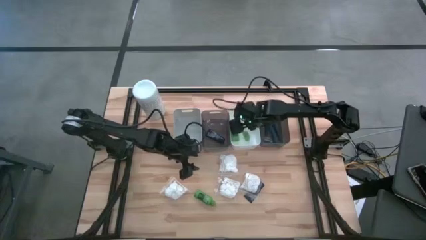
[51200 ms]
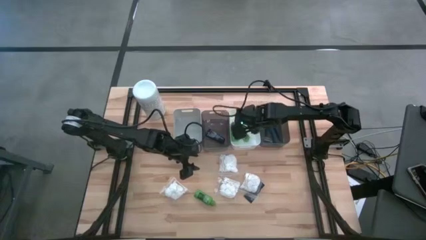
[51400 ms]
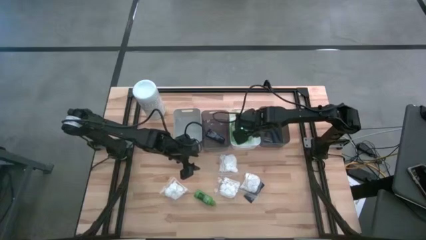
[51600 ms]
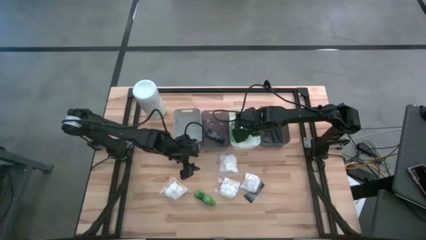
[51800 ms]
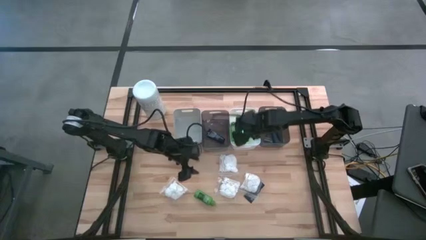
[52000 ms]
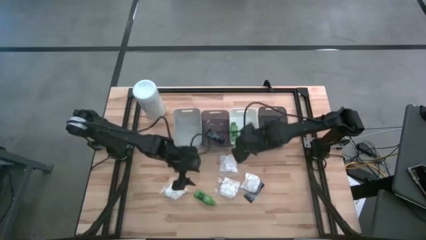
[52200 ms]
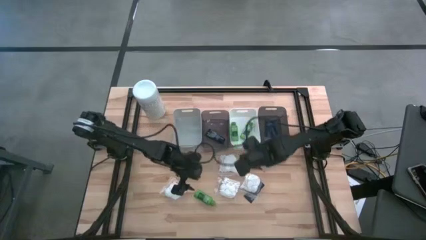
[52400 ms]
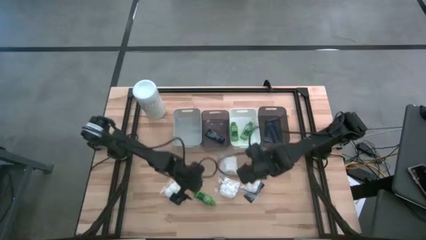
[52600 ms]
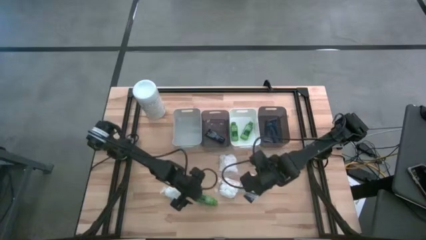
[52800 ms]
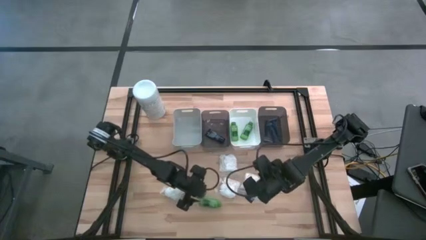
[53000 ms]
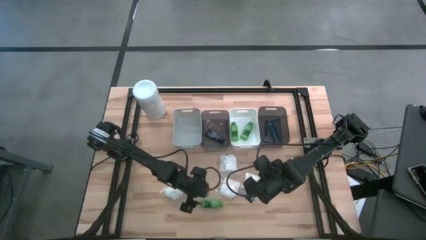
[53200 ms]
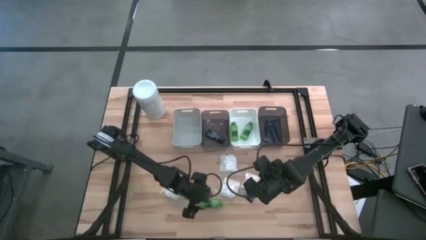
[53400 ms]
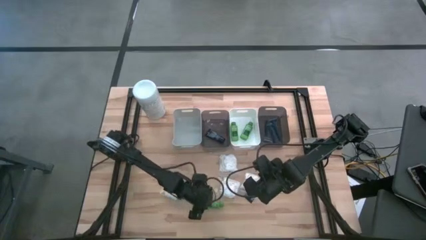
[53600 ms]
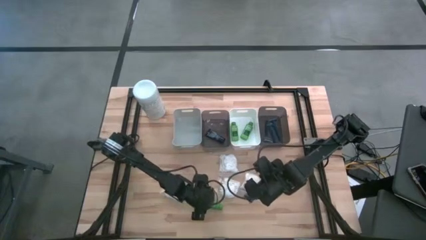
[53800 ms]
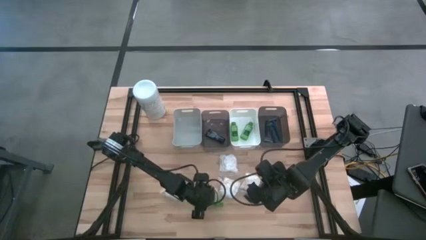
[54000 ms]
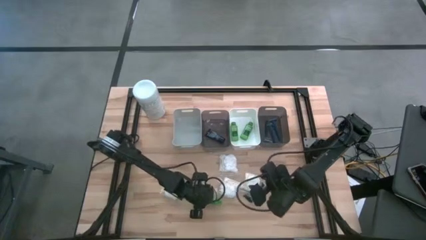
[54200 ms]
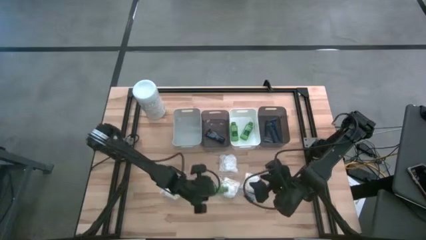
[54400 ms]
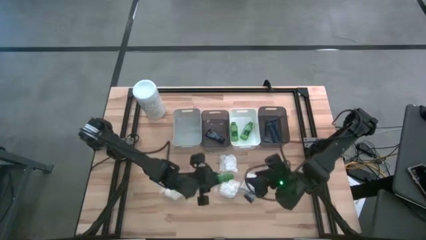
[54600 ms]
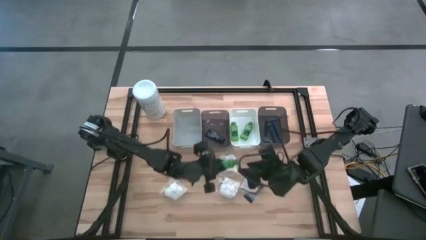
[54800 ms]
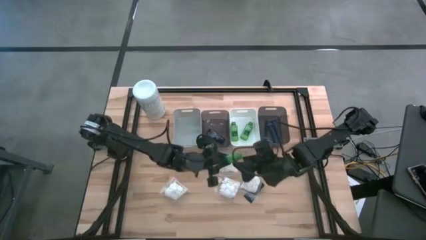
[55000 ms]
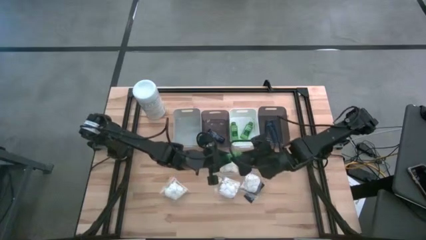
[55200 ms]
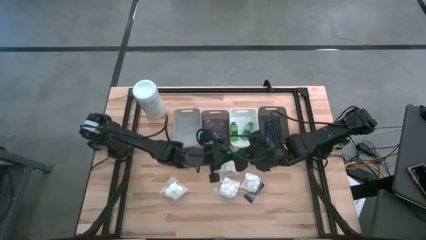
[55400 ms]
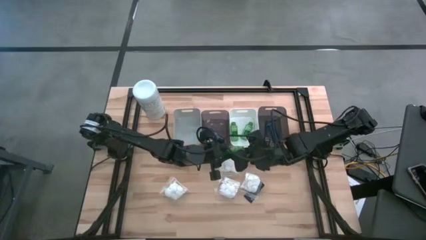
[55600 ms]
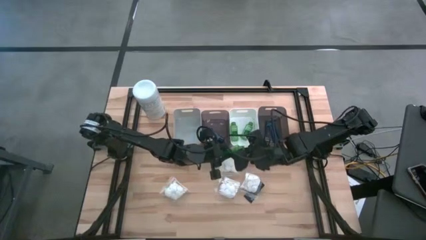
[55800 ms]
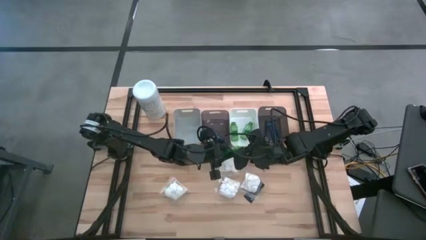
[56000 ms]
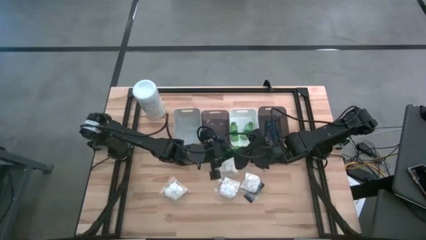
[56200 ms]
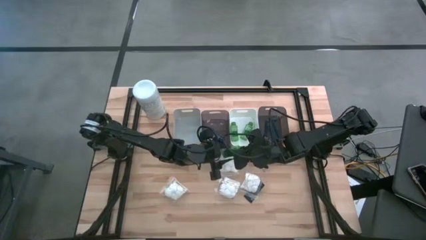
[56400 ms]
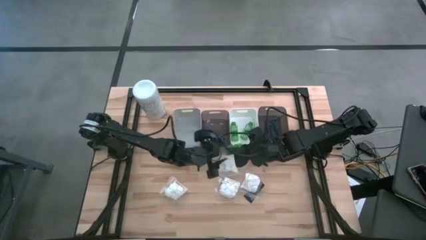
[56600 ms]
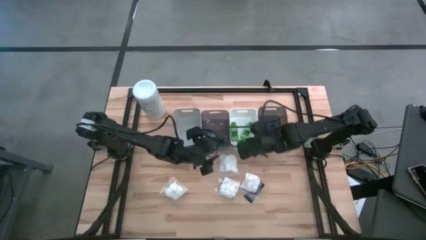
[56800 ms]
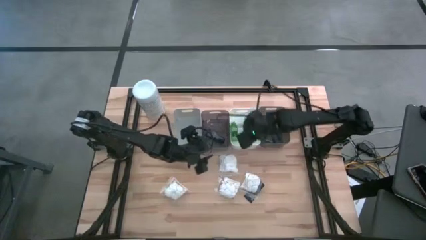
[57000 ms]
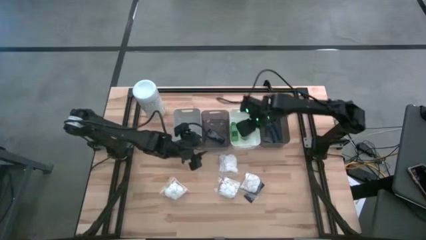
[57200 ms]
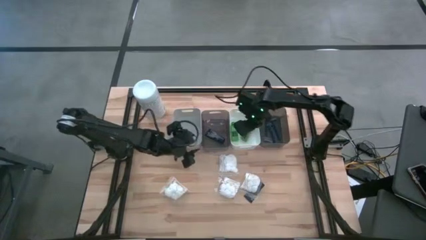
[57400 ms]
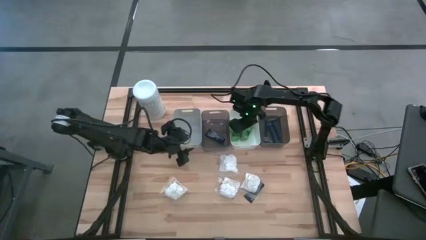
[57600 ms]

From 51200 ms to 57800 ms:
Task: Pick & Place Travel size toiletries
Put the green shampoo into the white bin

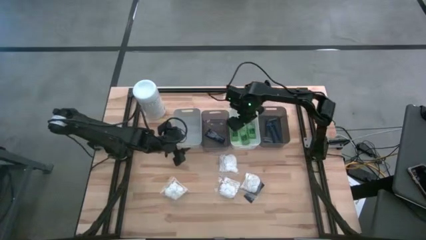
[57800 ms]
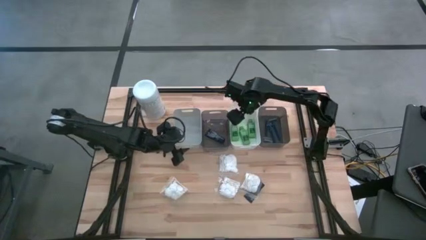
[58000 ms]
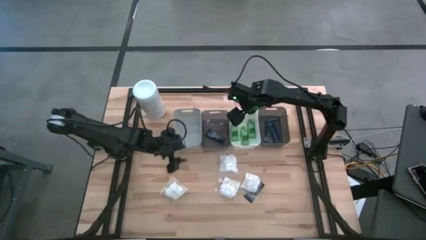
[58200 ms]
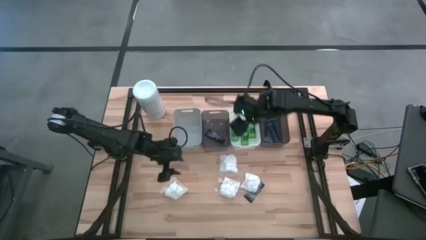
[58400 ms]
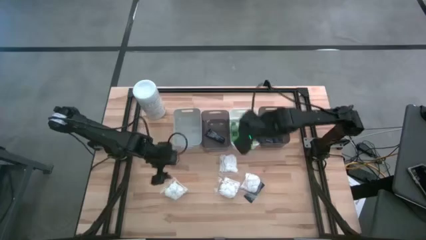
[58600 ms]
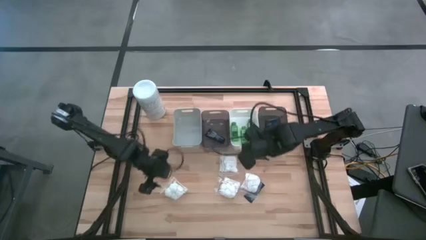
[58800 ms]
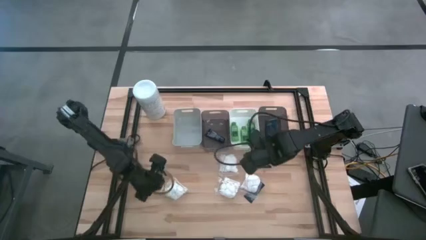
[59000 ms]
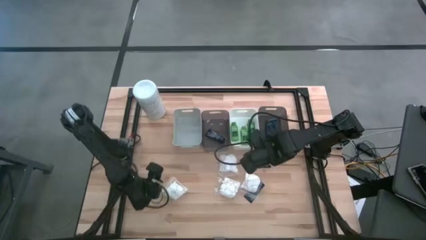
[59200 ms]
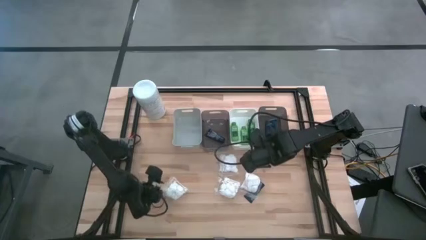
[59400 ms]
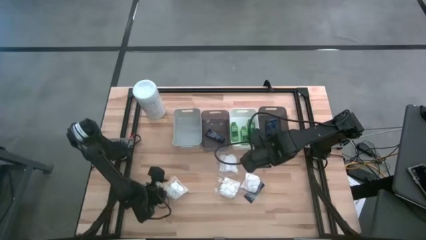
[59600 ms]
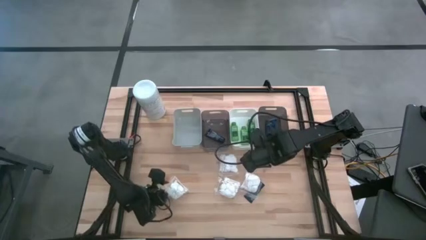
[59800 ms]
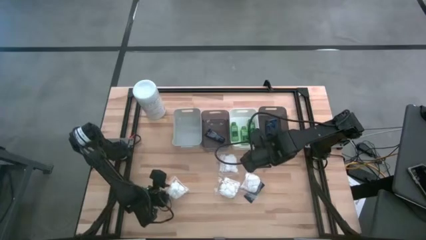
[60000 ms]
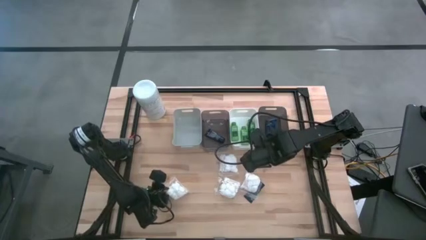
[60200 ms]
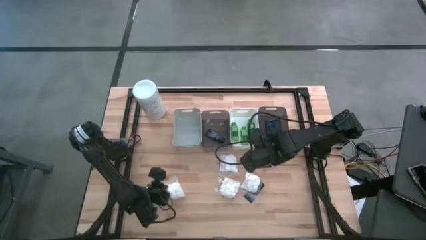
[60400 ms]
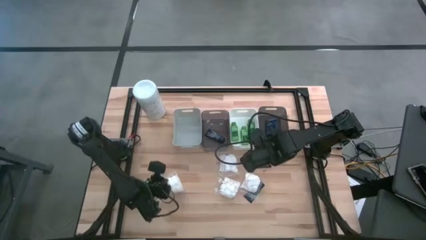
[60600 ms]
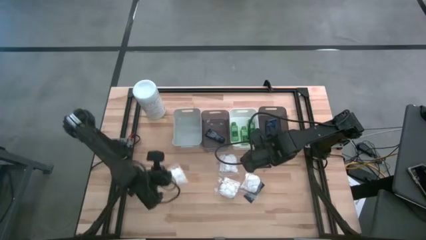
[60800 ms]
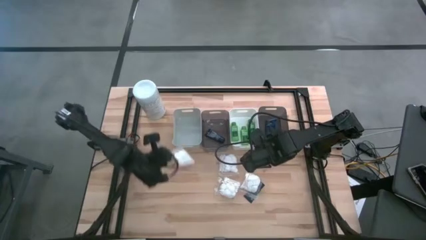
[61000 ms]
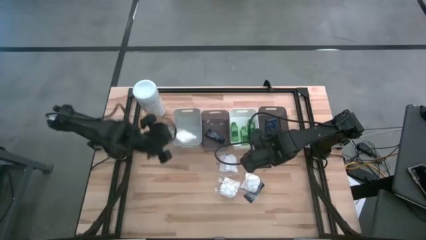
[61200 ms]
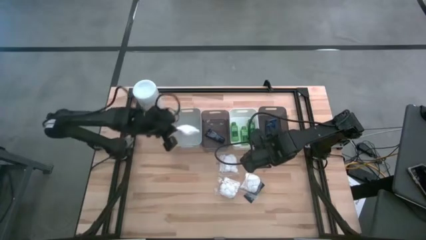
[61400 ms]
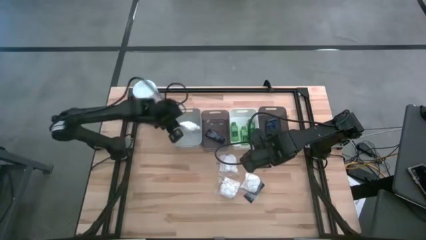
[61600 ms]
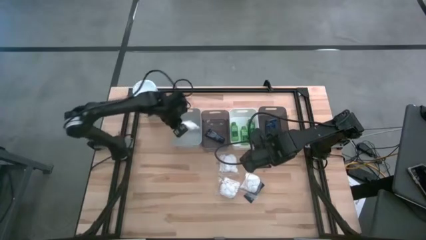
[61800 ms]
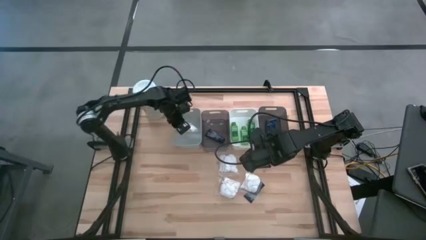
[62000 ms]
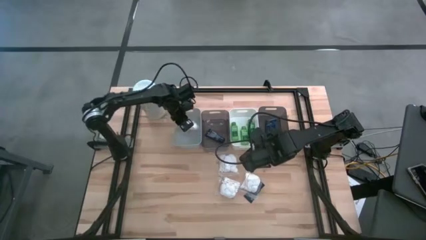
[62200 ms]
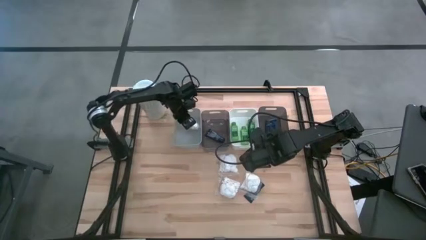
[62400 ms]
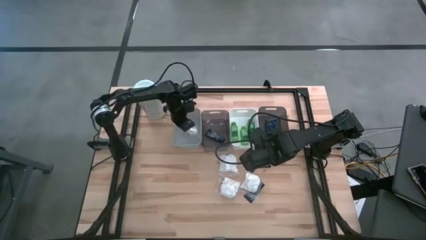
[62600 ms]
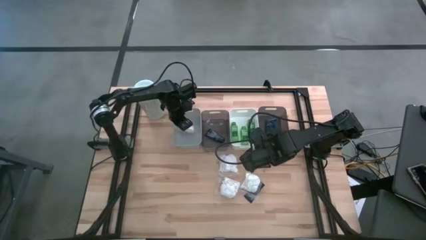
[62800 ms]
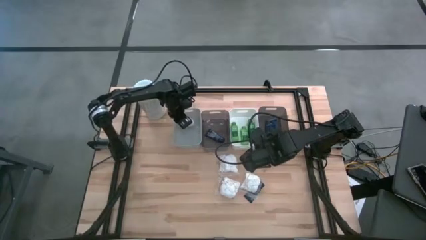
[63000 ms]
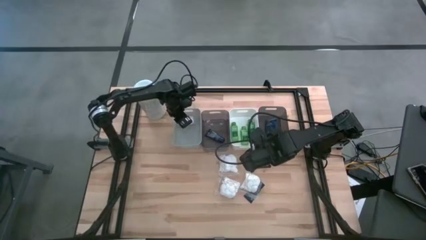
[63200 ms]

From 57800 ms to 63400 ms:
Put the cotton pack into the gray bin

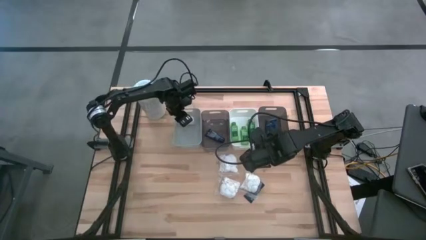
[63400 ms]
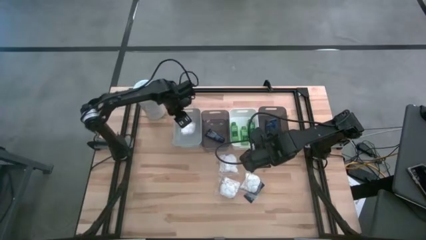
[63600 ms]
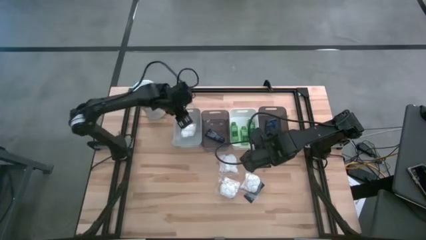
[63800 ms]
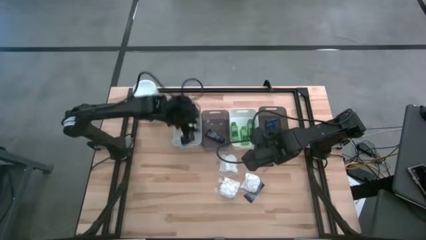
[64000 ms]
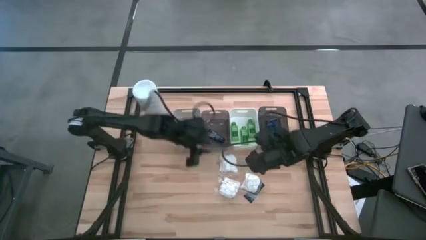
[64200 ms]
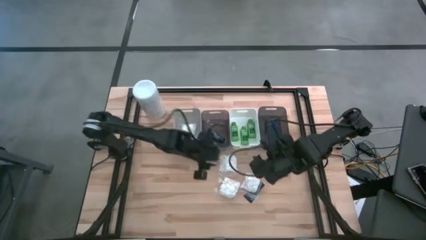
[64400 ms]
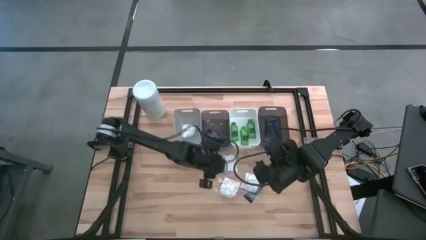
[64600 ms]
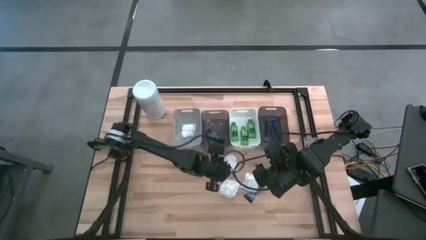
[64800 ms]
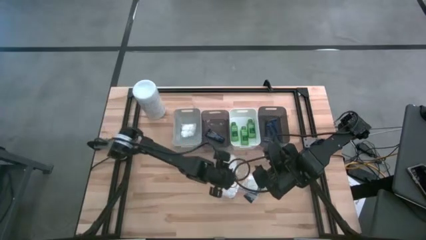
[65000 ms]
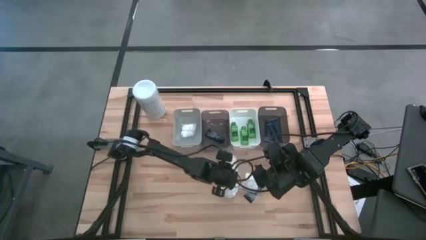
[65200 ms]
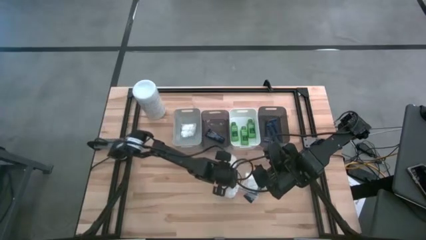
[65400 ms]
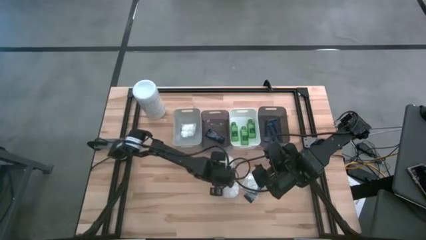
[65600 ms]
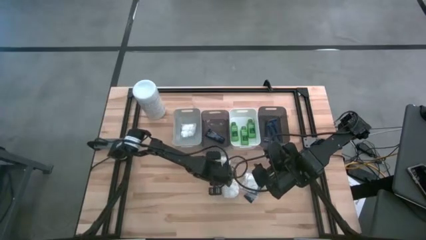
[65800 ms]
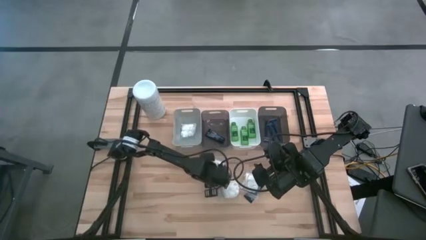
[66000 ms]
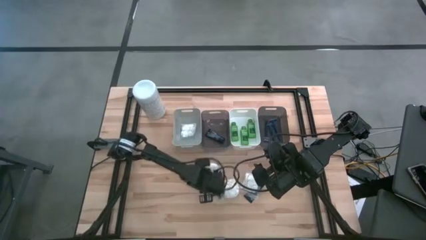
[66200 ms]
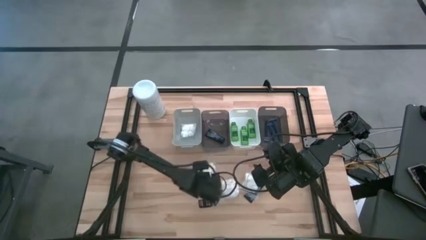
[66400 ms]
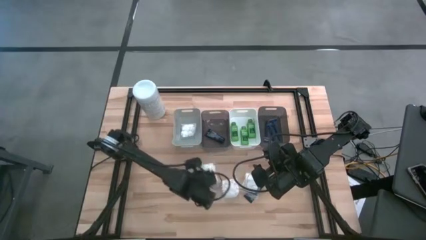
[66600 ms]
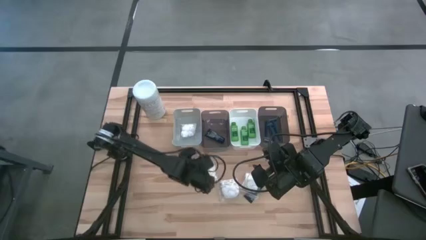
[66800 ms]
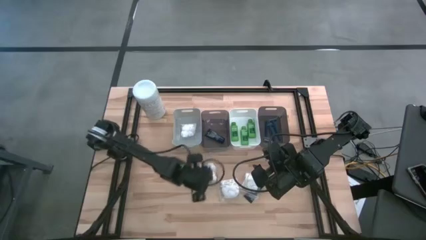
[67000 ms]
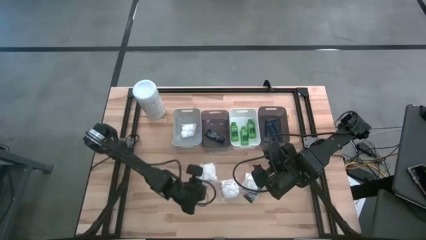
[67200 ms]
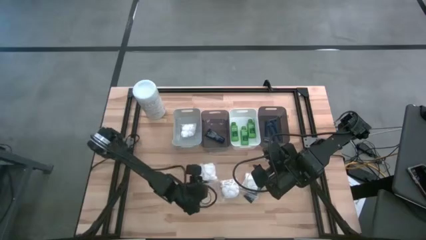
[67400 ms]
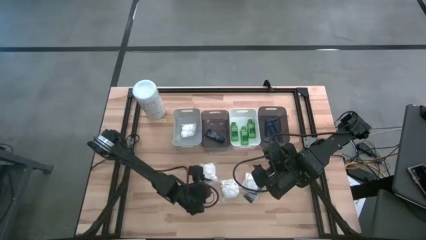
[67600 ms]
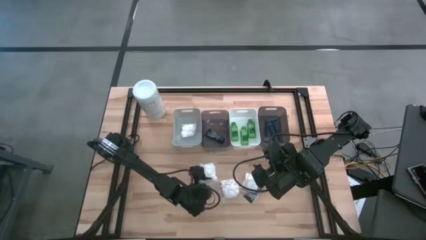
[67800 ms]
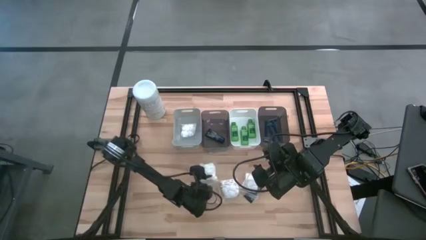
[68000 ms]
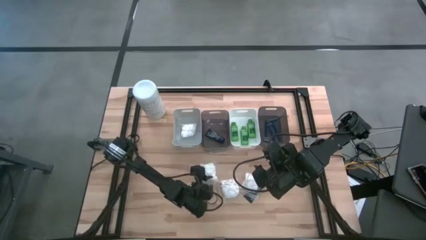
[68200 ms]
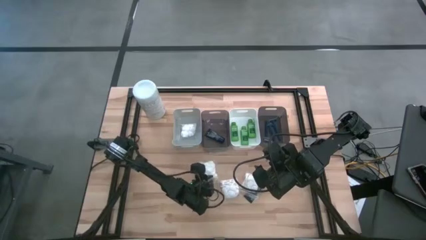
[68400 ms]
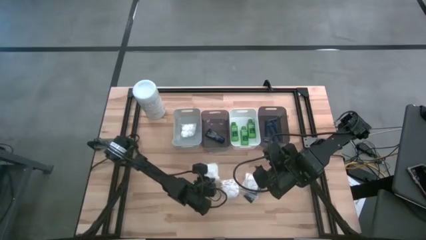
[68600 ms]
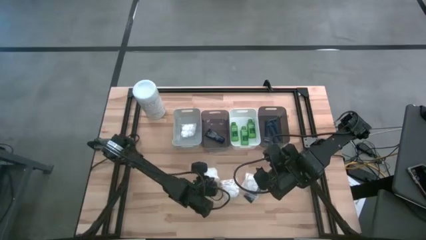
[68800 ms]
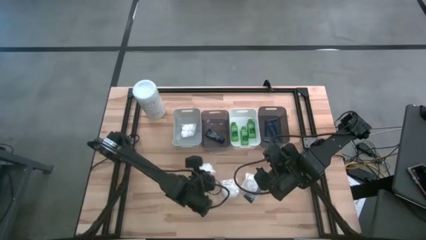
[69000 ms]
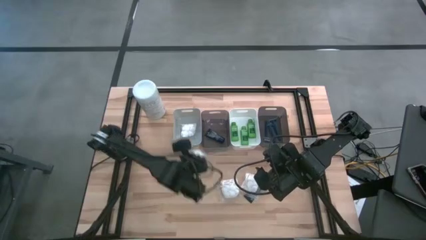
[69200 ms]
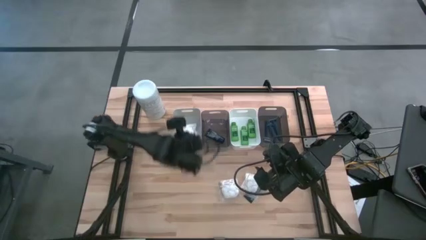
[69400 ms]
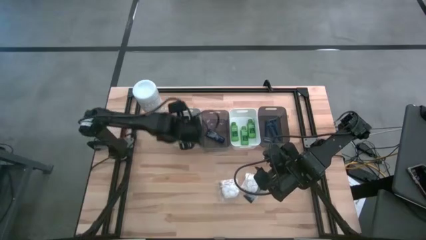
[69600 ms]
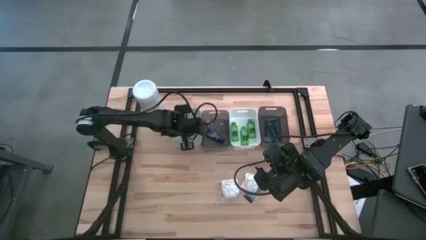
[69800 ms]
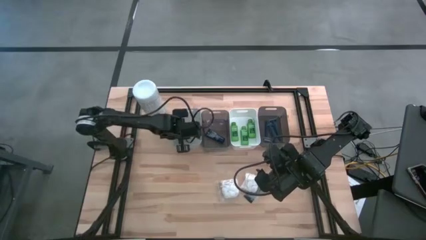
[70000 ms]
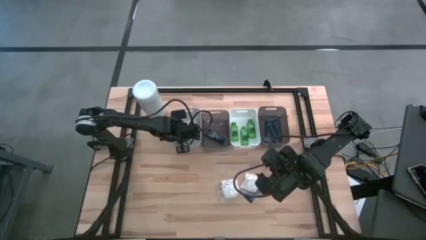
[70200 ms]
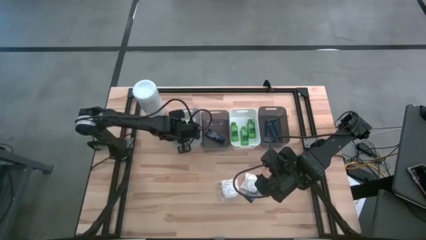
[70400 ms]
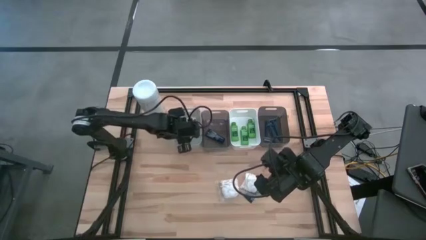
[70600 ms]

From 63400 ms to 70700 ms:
Put the cotton pack into the gray bin
